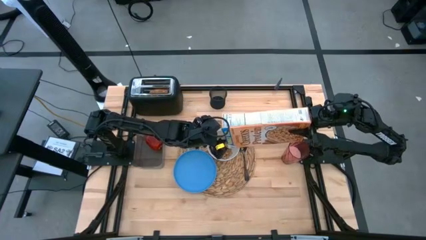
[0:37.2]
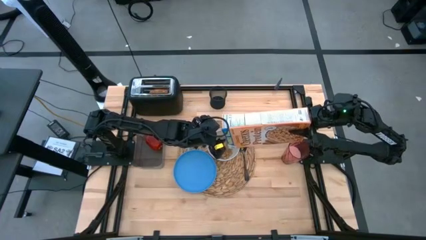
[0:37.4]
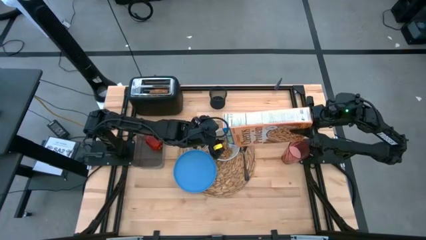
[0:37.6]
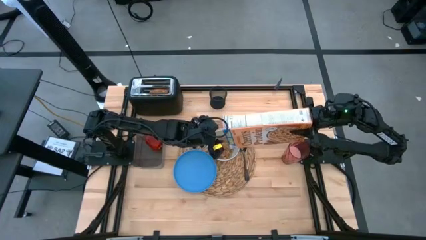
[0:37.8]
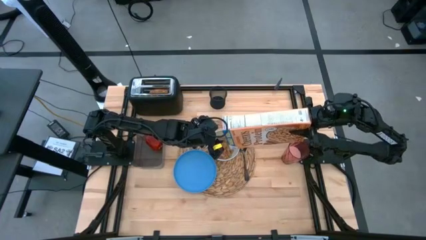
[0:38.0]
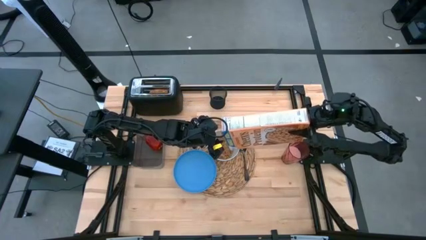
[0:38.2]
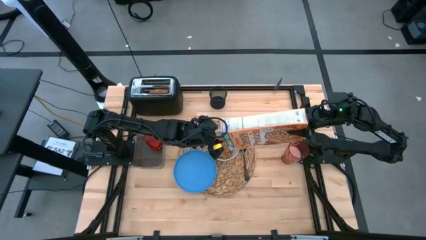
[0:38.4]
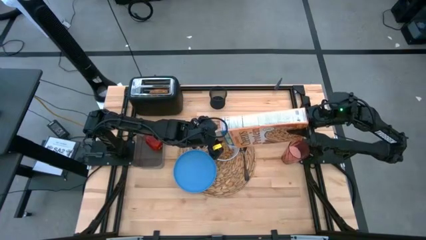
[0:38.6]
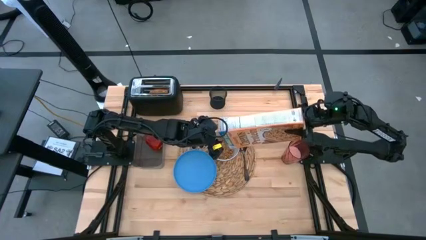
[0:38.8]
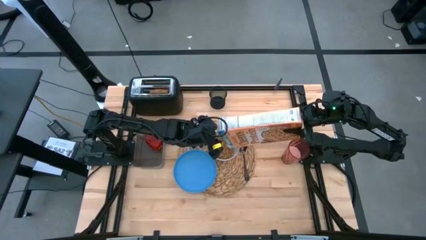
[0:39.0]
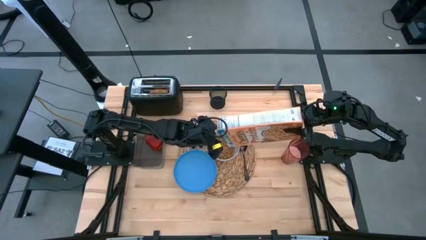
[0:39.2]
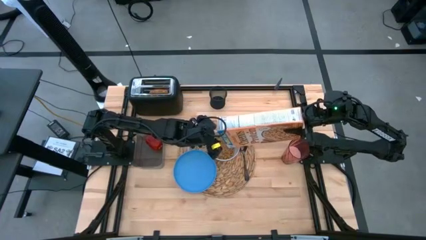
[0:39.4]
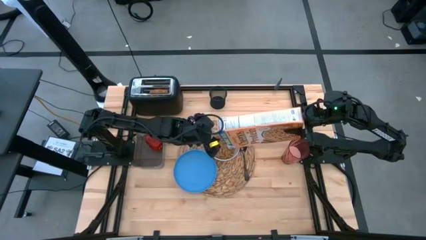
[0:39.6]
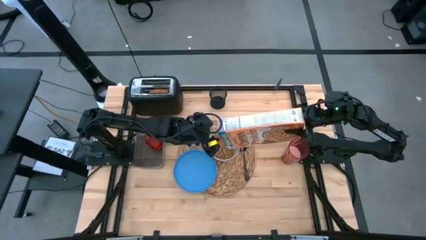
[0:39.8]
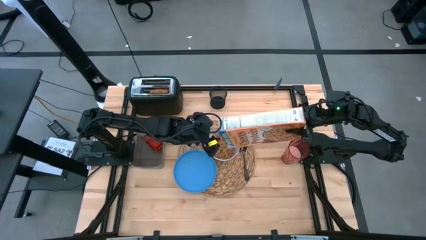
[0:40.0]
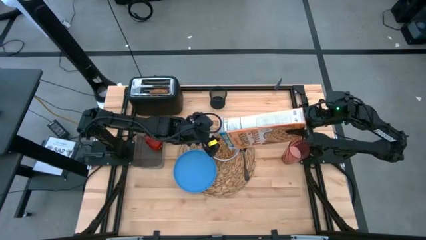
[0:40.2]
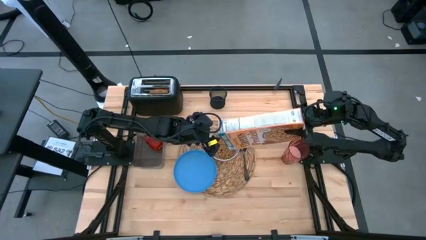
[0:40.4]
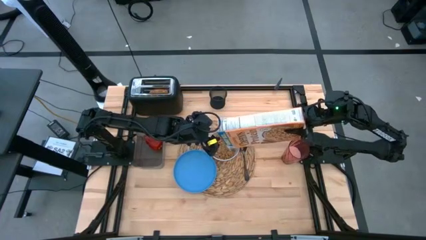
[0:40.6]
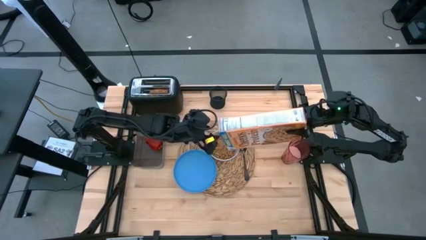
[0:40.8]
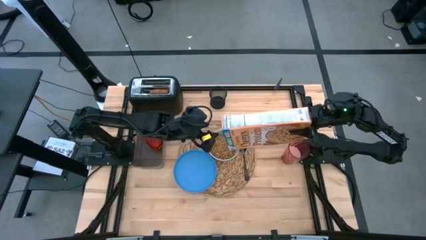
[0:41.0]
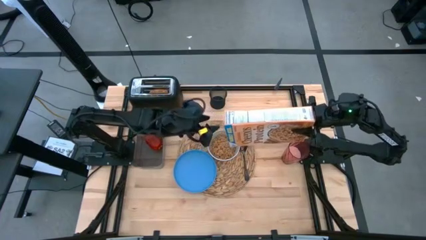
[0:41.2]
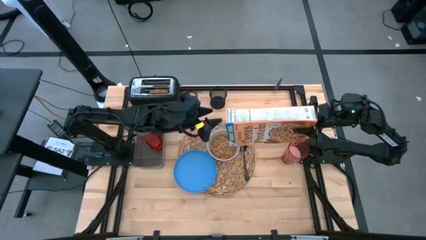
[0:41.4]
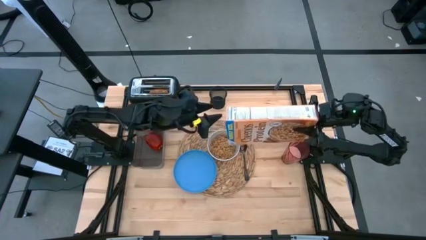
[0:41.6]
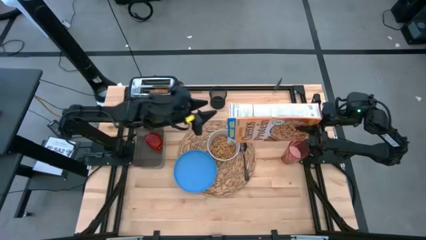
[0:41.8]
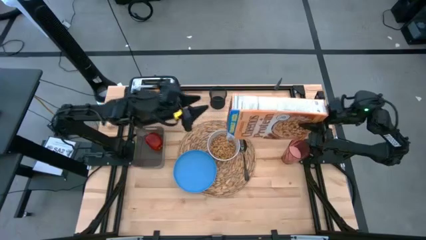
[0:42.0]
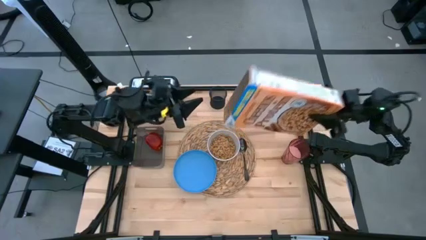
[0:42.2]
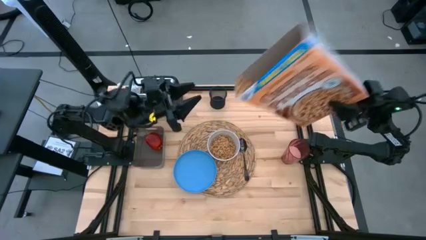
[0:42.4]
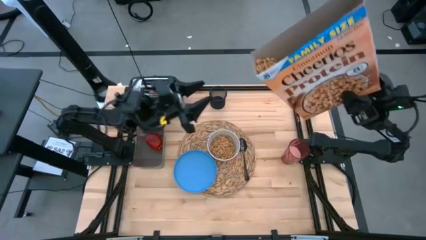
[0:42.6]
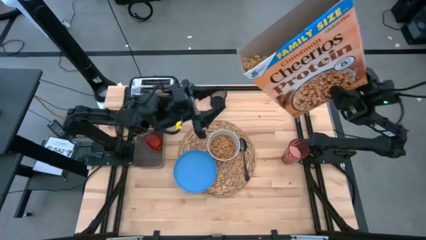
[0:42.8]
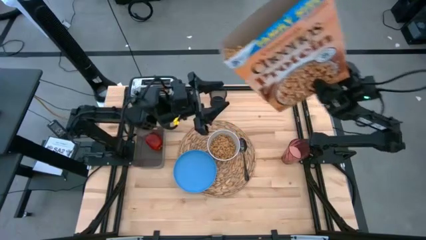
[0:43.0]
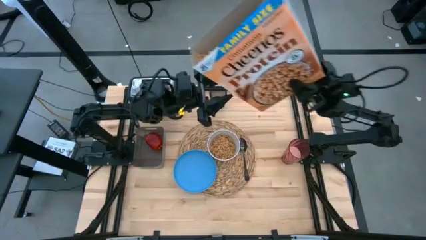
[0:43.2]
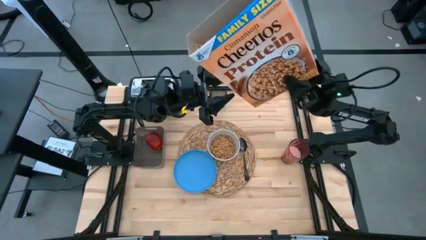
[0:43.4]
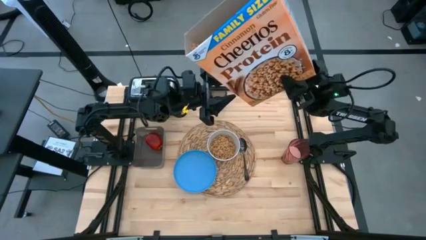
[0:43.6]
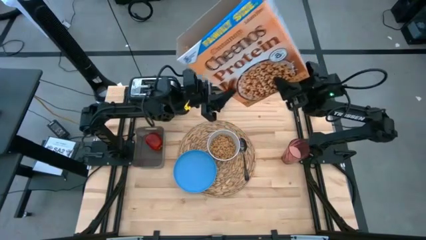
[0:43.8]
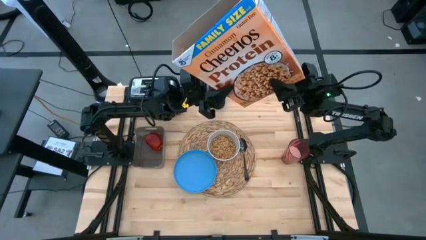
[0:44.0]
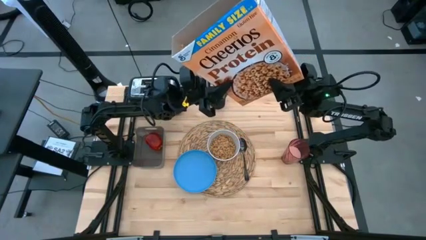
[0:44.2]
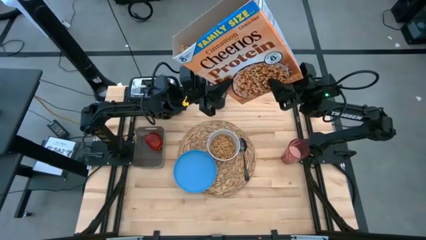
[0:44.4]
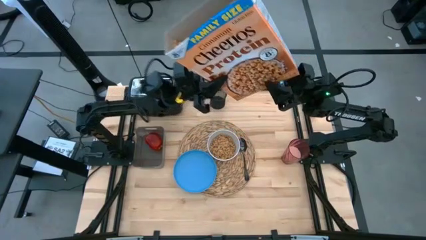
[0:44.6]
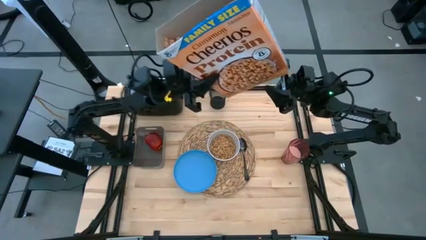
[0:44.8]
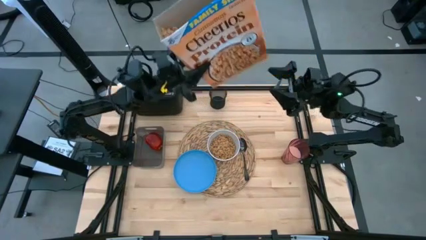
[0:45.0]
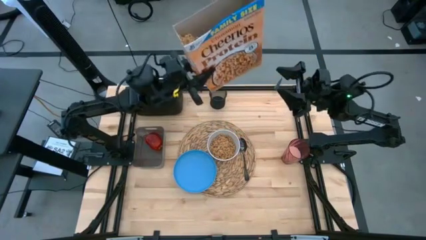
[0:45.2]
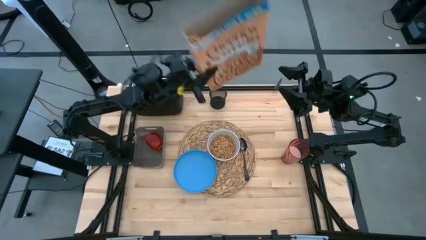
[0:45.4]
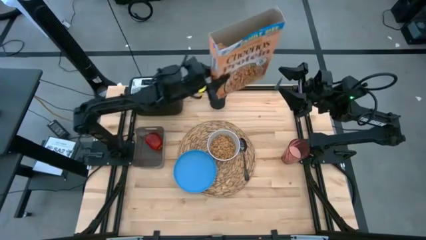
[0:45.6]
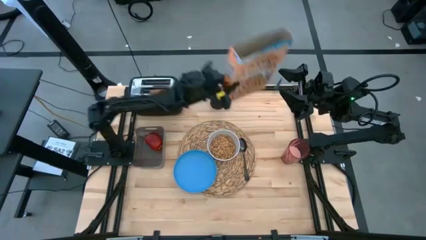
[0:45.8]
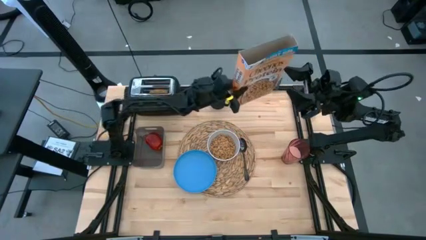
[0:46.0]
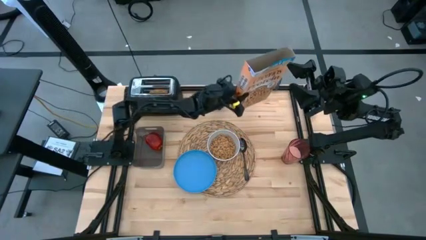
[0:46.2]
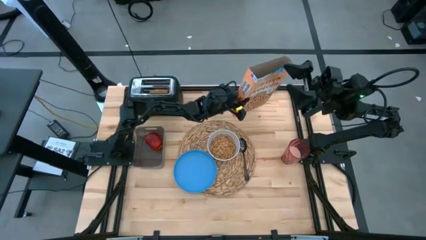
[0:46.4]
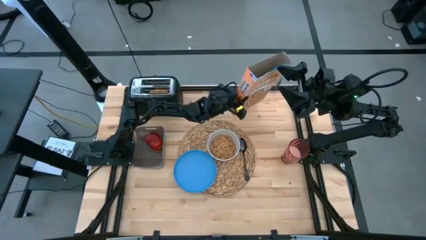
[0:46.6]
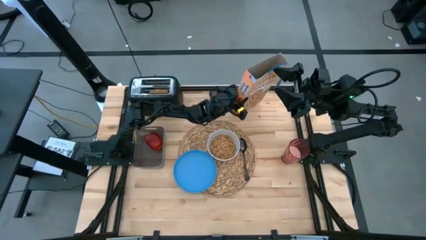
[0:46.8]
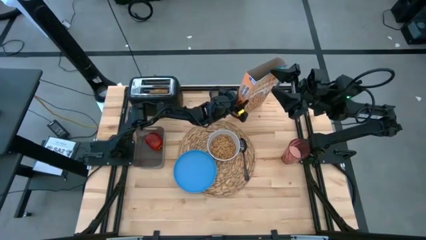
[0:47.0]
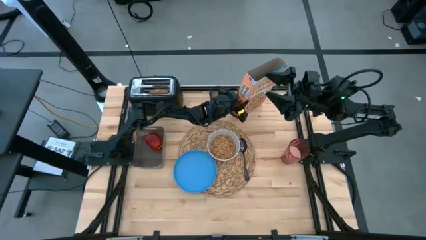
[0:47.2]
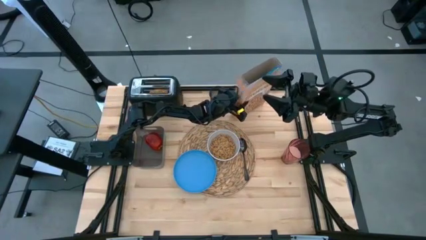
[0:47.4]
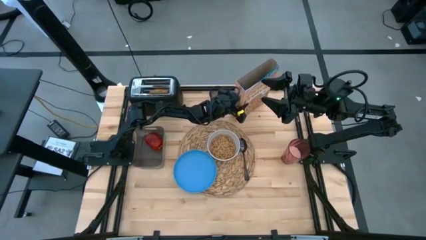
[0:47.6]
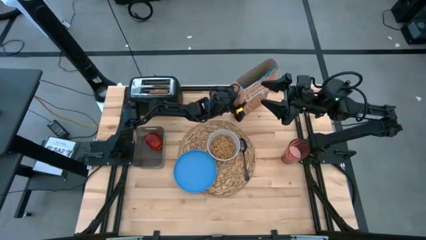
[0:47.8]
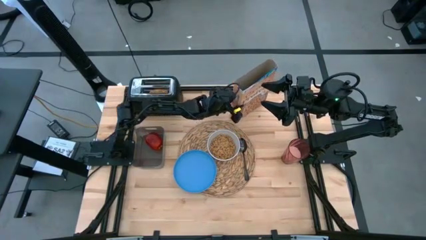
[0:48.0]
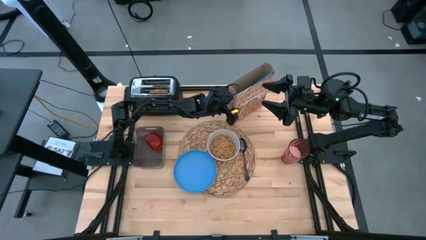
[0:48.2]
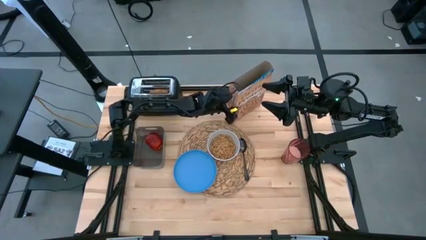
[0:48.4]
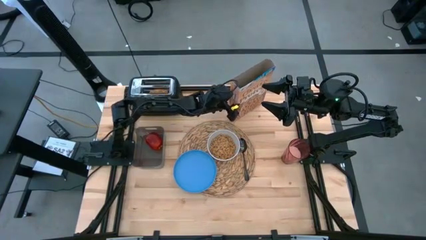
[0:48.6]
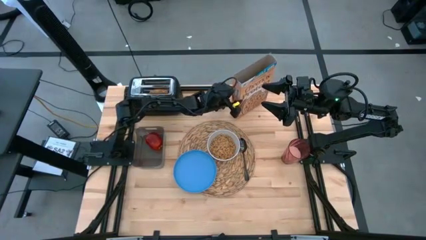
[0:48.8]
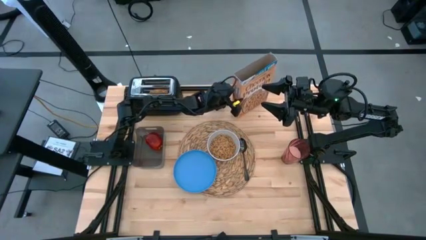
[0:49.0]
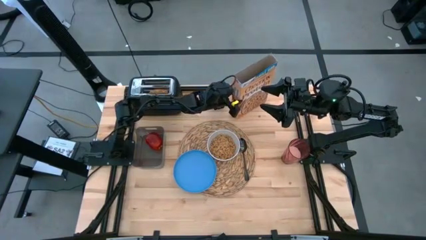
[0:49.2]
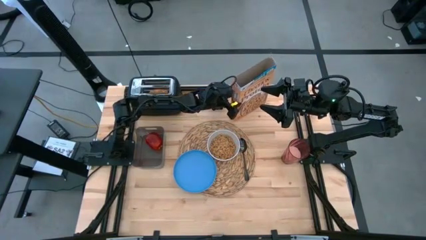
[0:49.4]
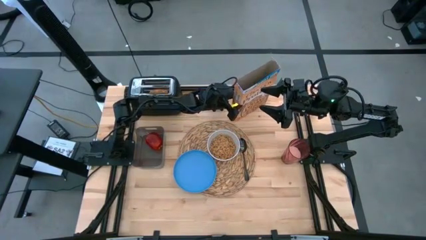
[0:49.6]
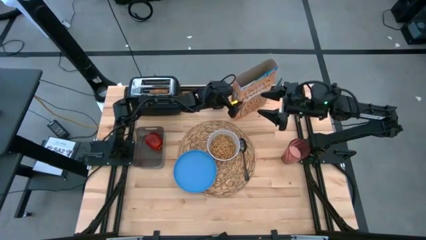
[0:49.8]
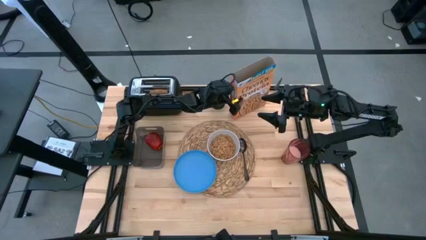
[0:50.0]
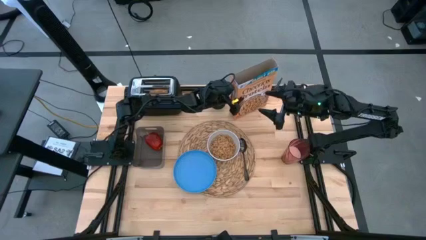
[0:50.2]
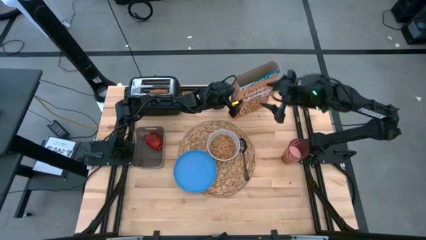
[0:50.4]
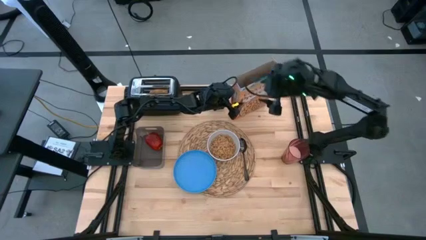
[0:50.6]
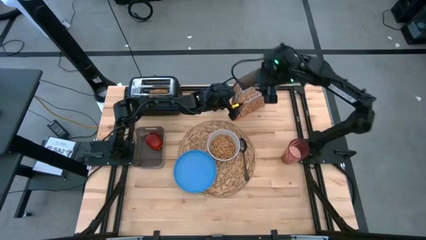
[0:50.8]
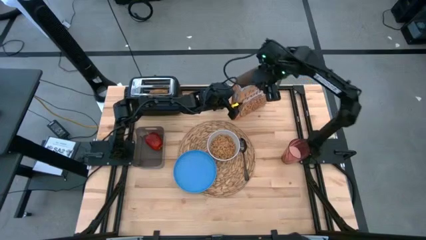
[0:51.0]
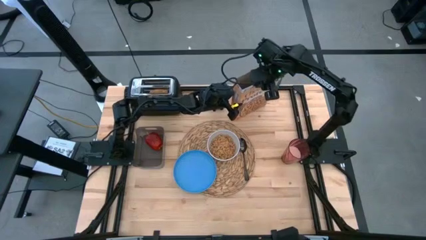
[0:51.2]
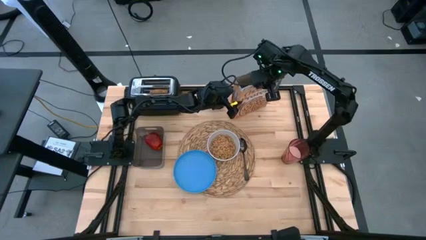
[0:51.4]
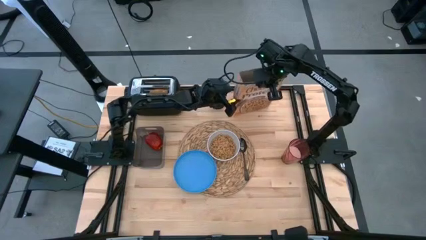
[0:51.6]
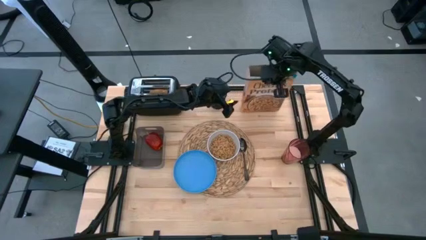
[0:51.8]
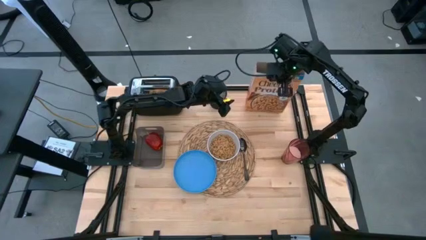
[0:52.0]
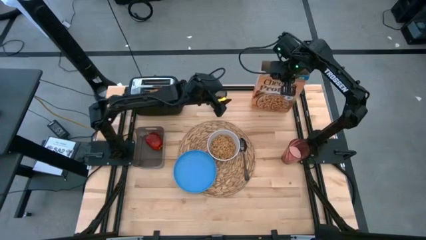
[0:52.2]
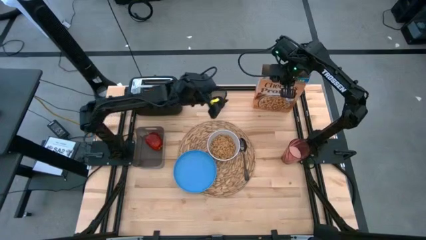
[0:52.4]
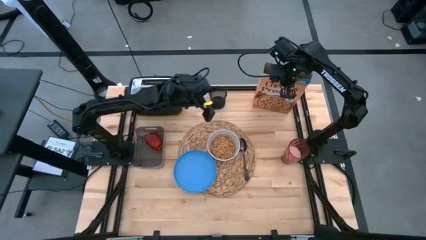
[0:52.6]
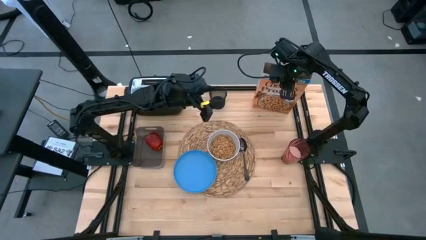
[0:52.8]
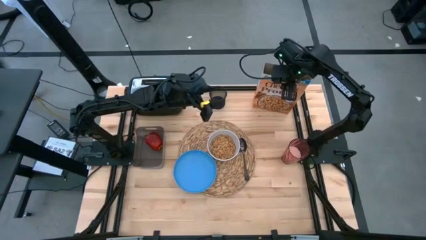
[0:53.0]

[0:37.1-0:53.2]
Task: Arrange a breakfast setting
Pour the cereal from the yellow cereal box into the white bowl
